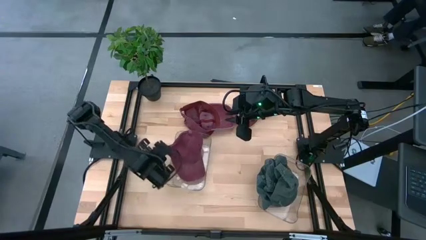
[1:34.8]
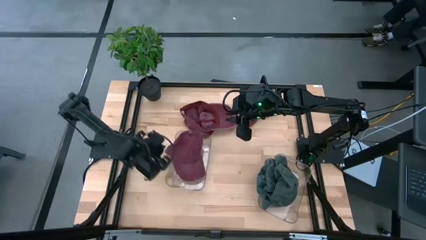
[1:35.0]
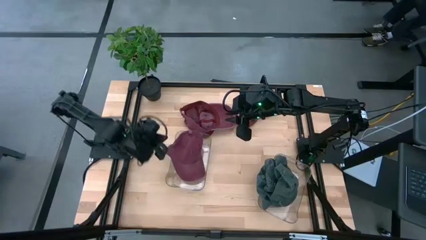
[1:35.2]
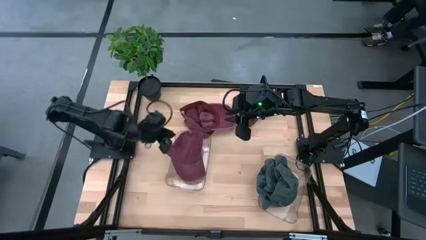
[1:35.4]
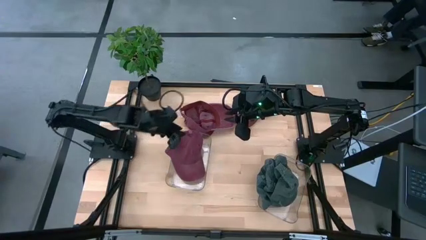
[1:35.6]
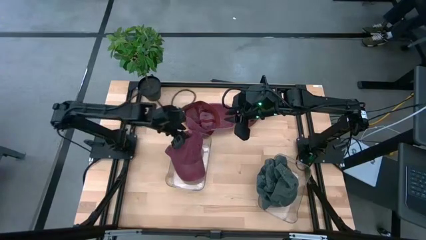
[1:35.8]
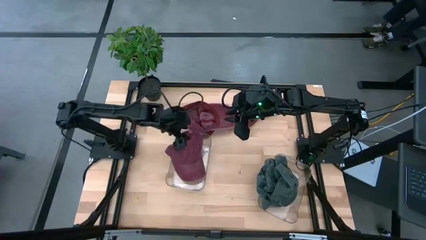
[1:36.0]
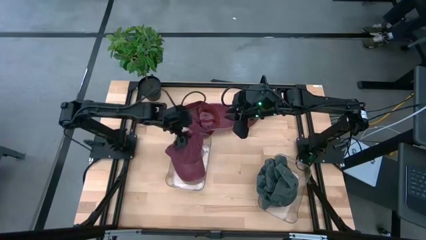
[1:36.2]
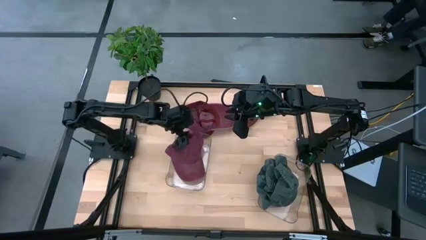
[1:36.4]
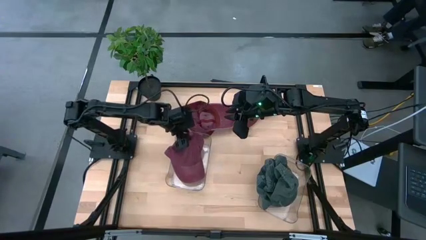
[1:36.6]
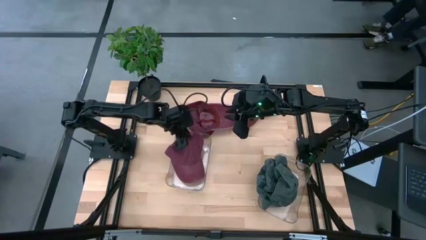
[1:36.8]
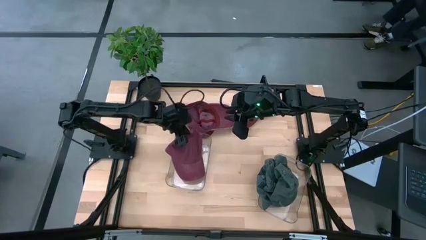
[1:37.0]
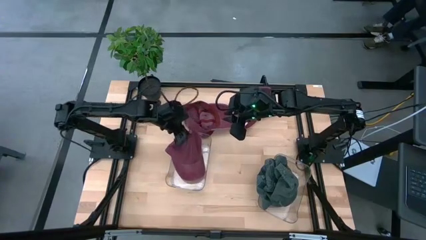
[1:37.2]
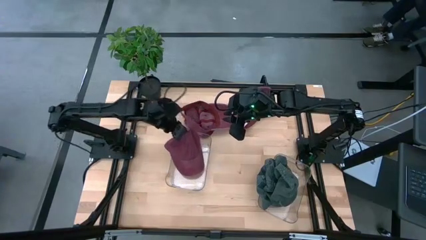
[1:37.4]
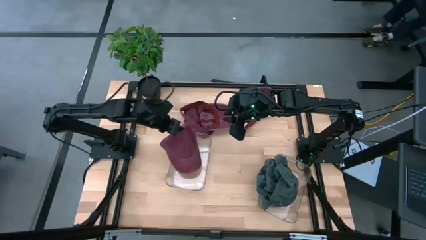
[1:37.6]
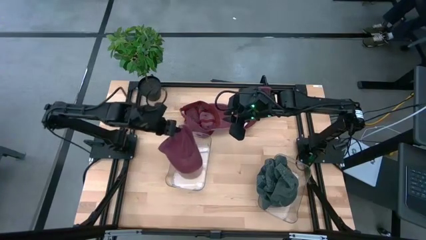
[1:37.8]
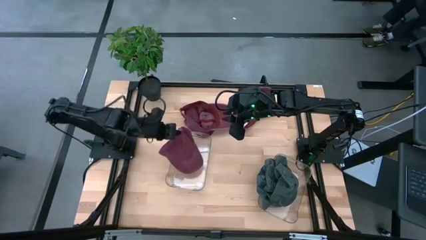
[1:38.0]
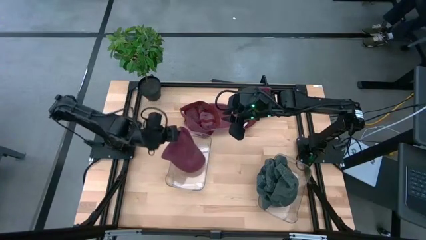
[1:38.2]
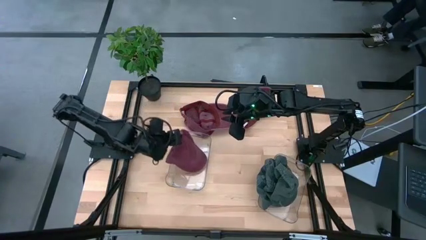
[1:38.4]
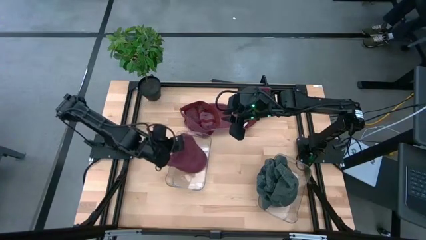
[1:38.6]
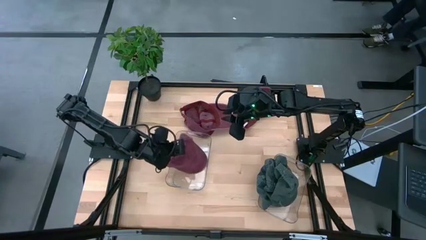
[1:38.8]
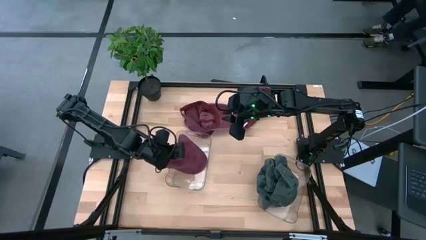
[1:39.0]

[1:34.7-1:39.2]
Task: Pick & Place hat
Adjust the red cap in the left transparent bin

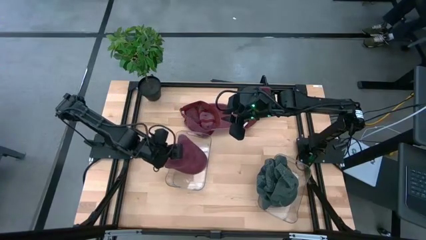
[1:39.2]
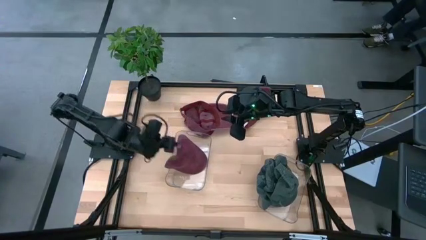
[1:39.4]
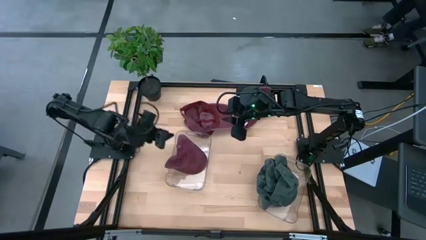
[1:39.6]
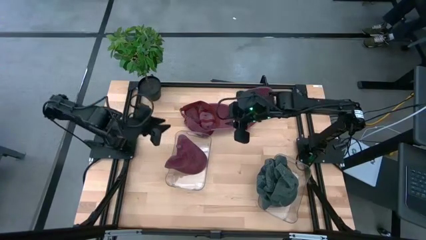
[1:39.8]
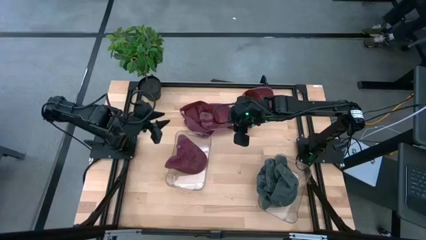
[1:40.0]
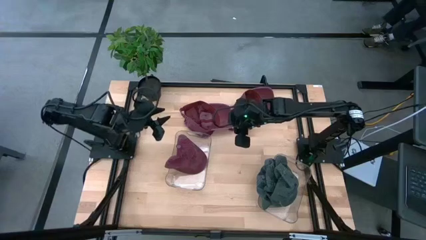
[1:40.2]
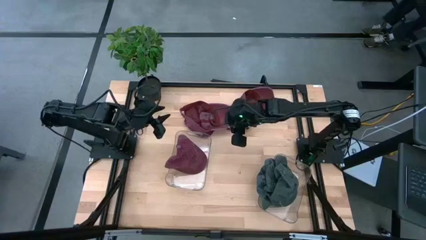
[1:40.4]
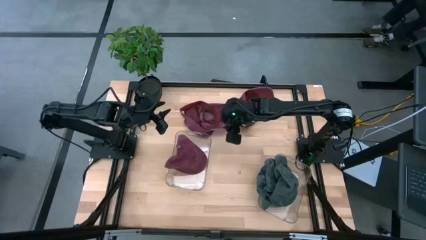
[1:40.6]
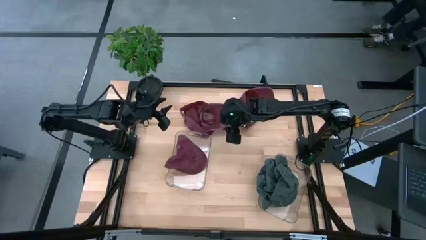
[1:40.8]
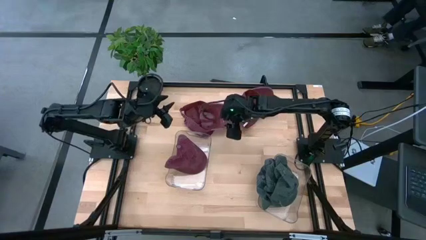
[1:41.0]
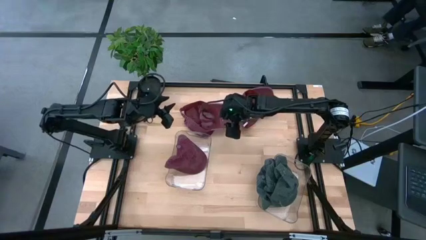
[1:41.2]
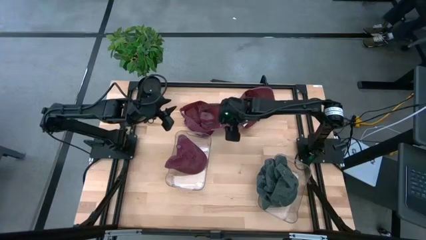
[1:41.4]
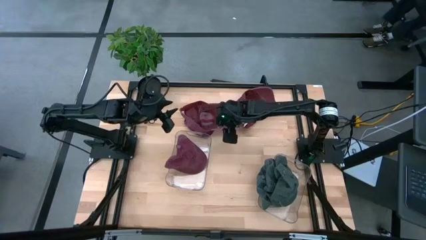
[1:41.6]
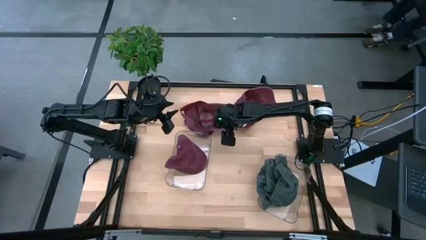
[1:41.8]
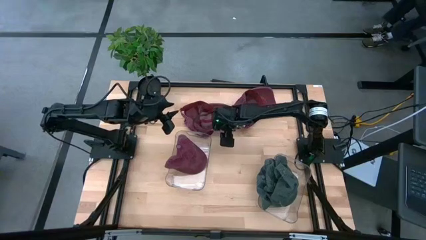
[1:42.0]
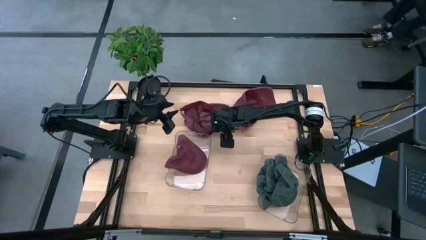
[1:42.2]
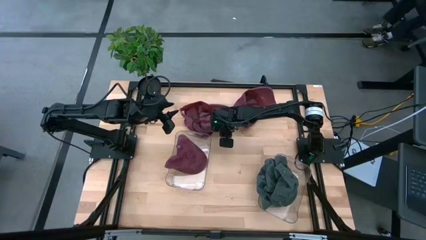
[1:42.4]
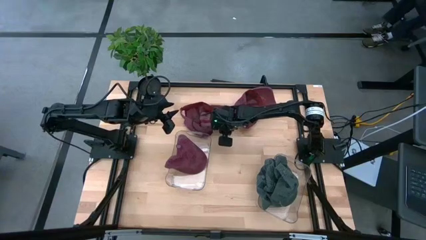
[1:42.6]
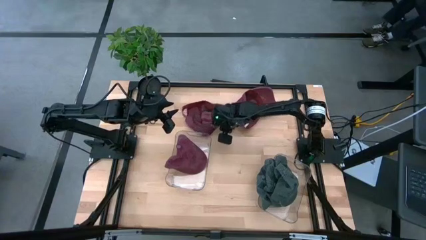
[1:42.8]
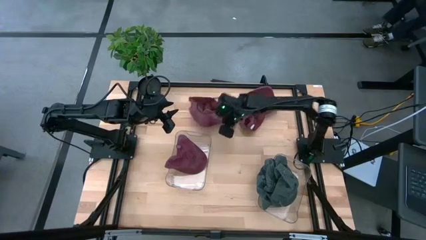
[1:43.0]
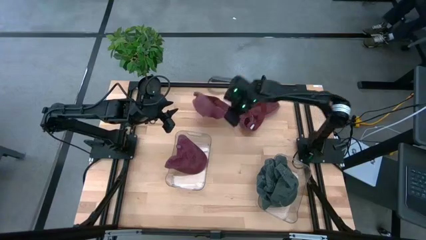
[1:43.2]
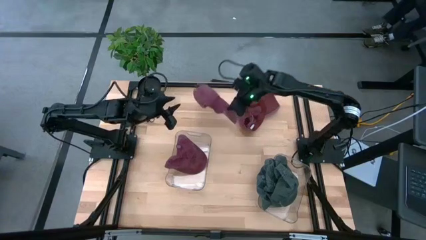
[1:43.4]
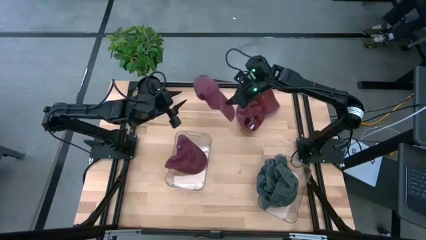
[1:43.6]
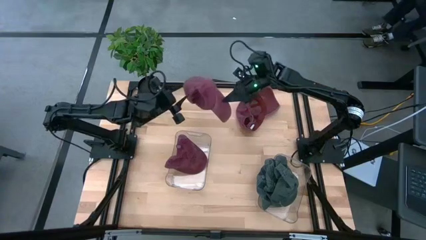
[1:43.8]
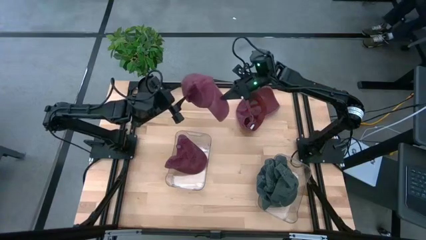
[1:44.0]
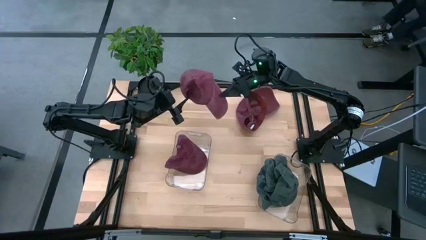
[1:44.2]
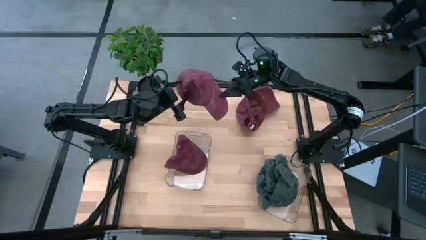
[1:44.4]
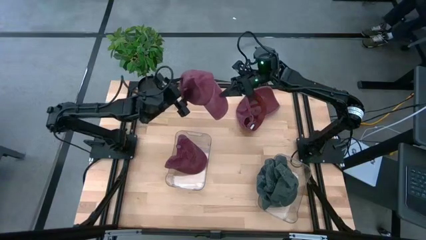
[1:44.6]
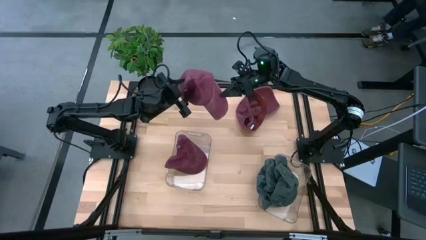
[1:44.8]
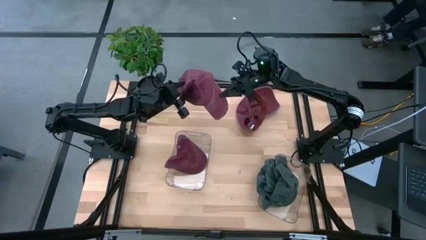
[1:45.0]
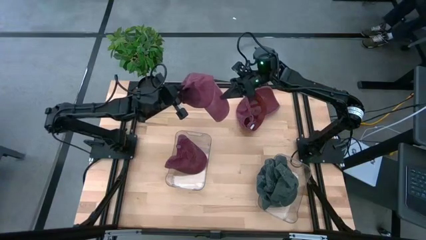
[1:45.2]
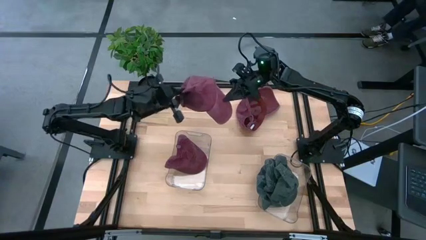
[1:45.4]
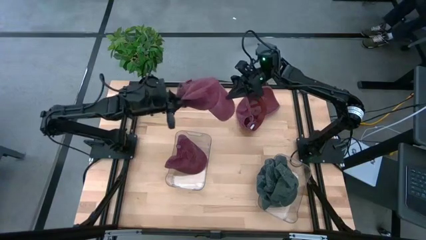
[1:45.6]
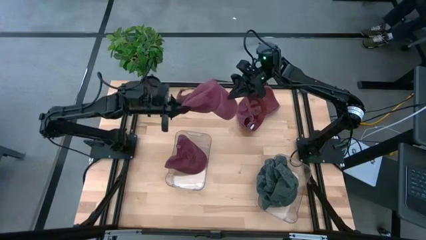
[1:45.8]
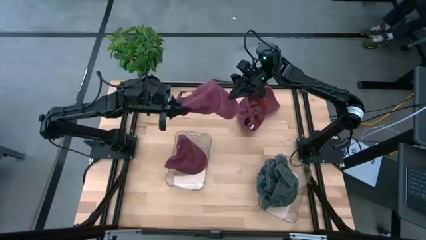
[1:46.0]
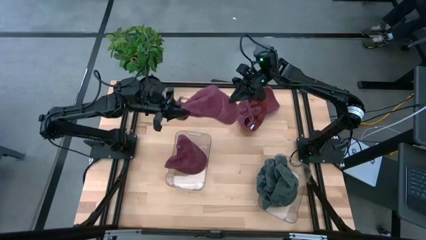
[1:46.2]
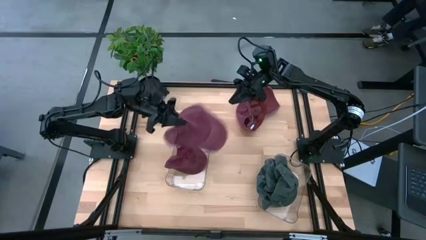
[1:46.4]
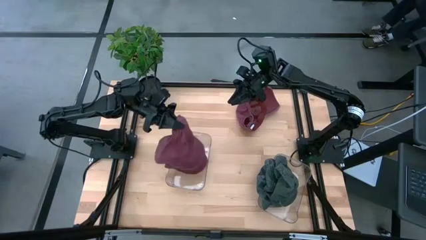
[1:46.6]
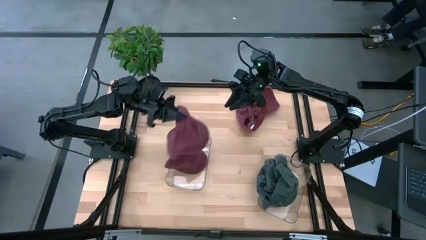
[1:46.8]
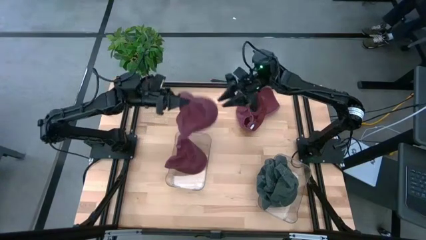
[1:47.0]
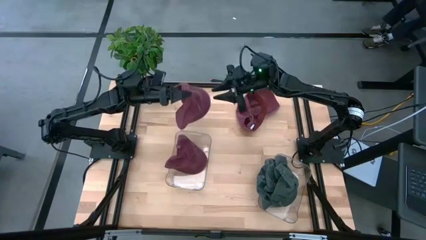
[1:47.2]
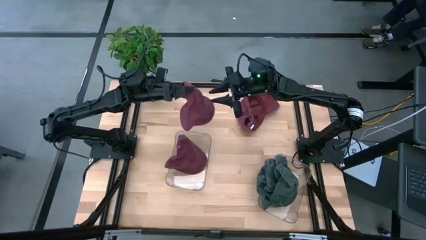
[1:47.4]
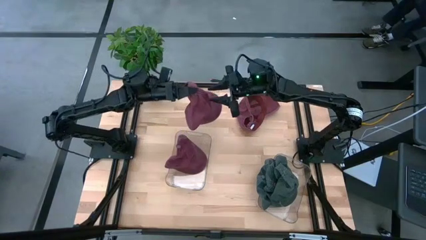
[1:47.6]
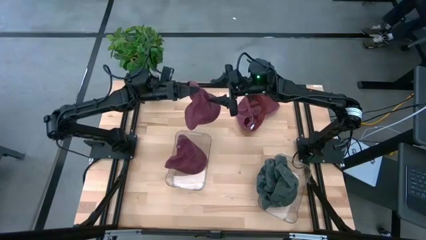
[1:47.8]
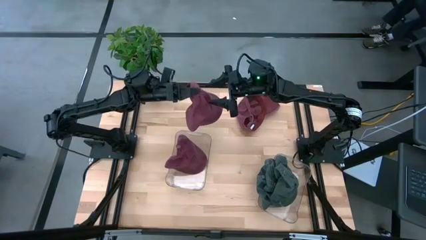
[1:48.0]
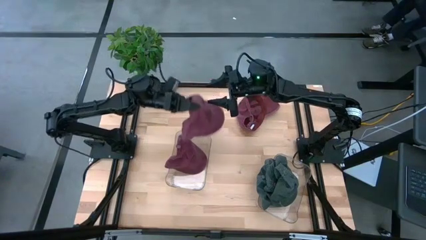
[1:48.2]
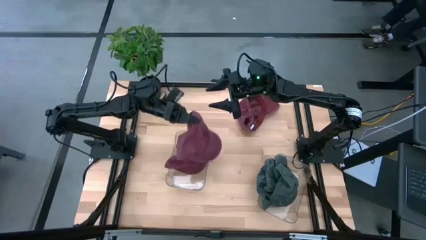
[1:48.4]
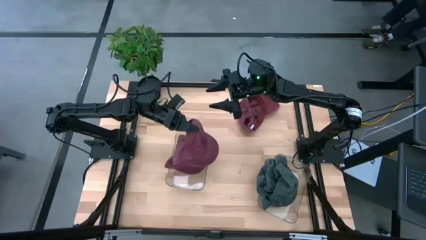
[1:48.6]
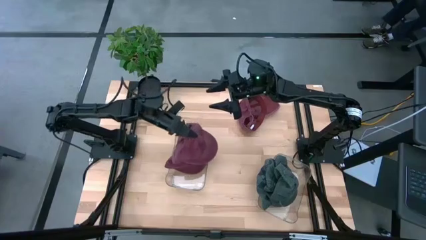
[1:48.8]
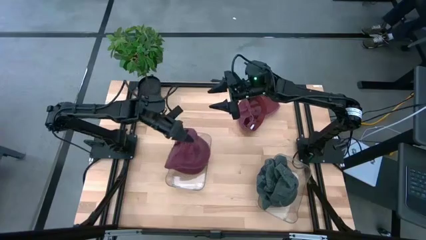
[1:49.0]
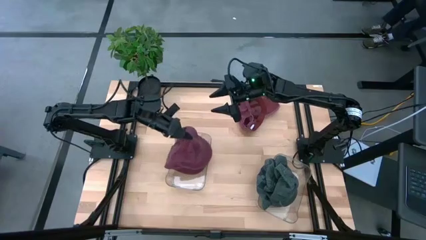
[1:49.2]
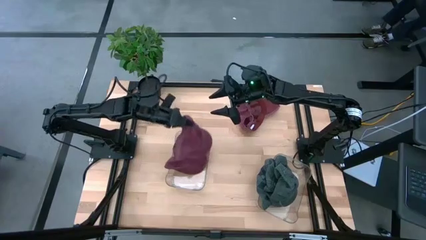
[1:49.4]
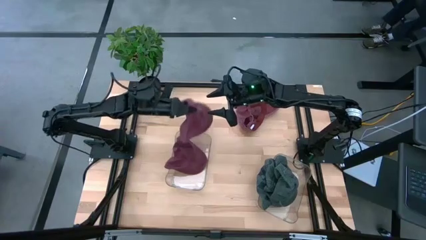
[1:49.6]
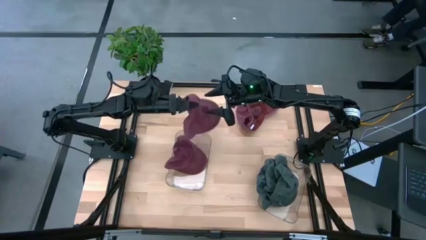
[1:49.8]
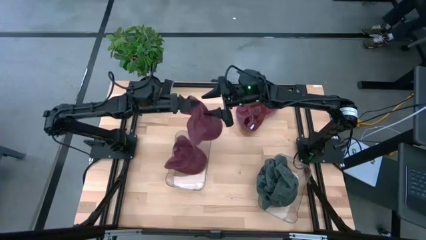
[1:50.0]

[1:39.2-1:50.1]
Put the left red cap into the left transparent bin
